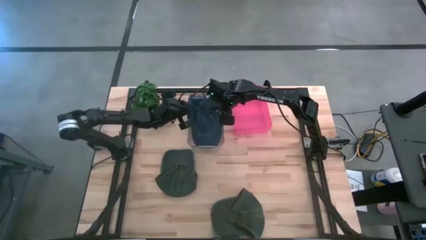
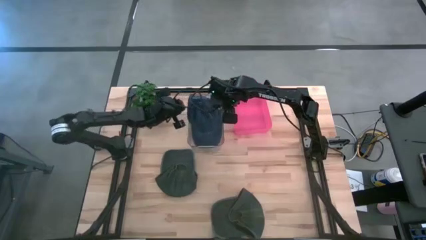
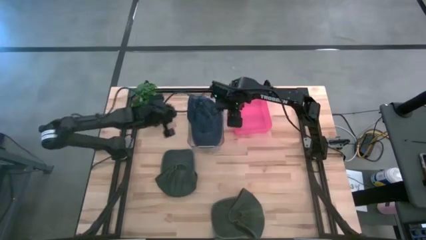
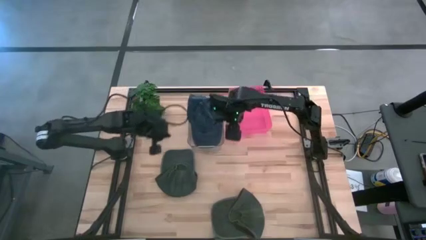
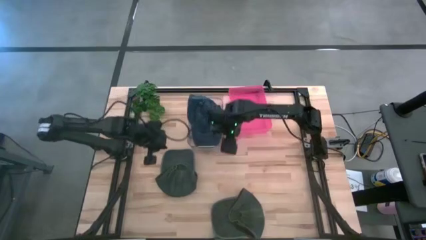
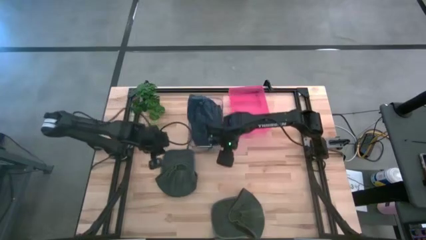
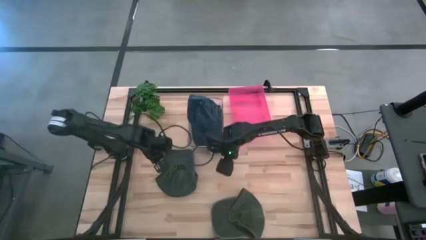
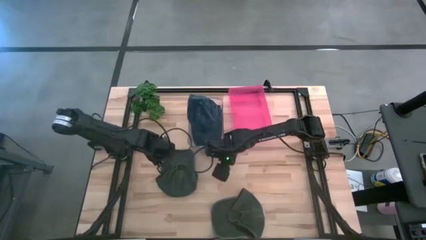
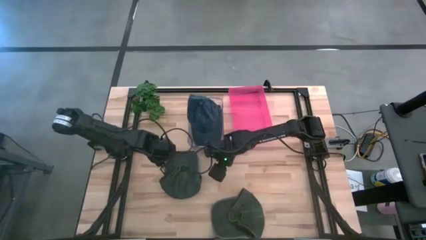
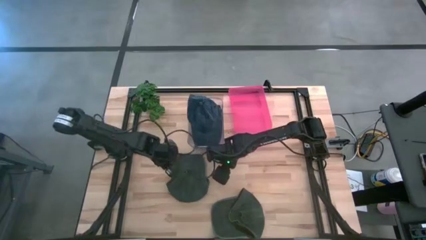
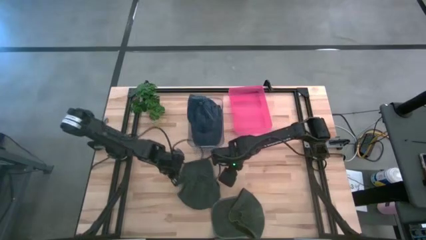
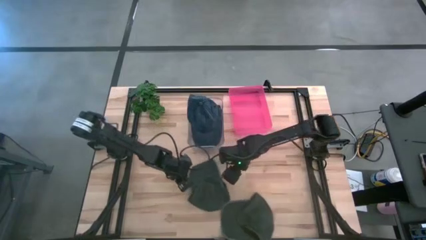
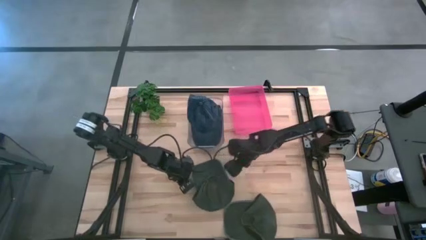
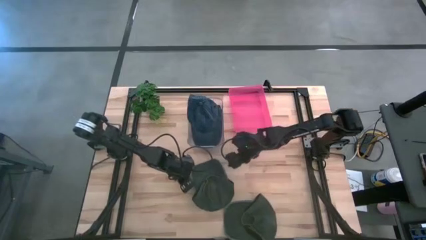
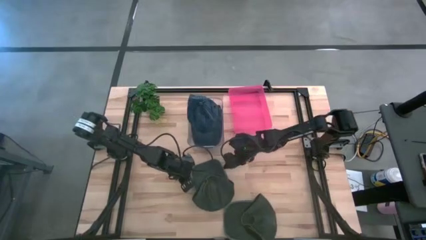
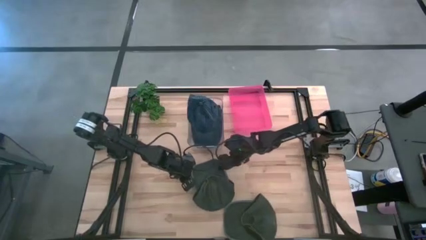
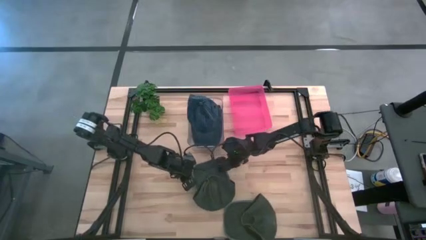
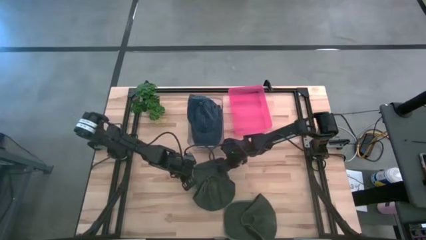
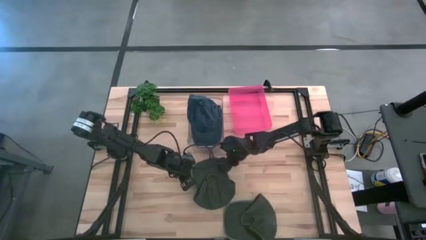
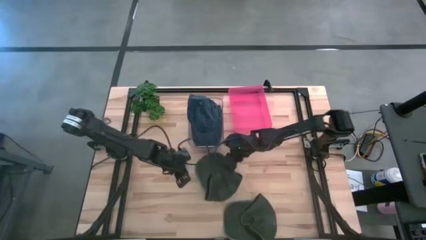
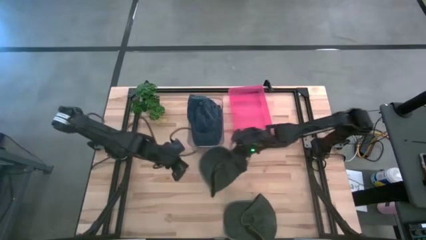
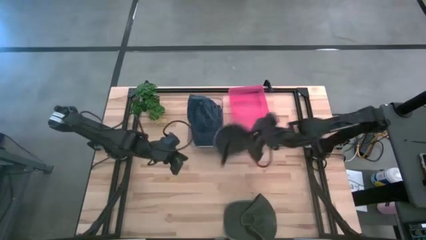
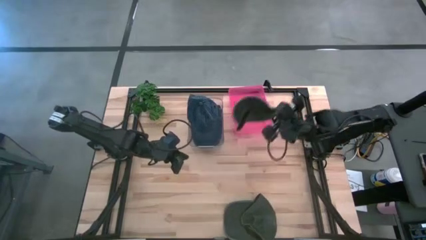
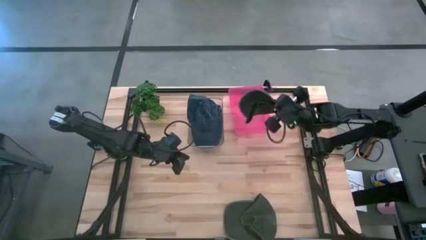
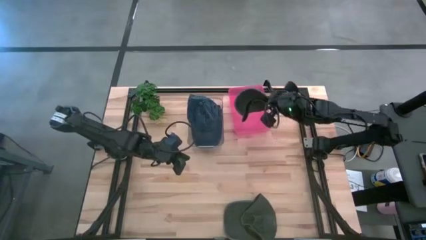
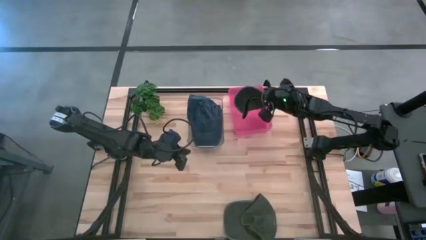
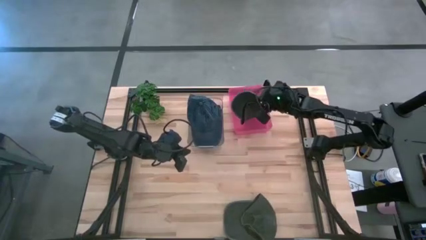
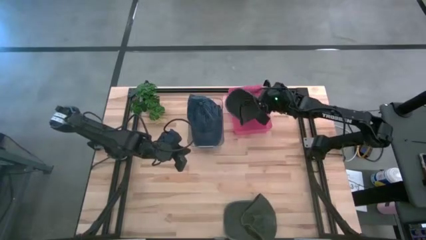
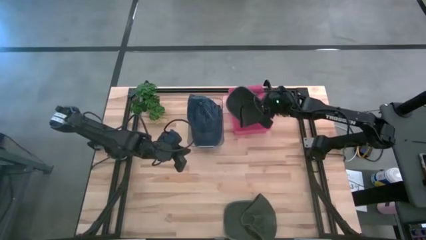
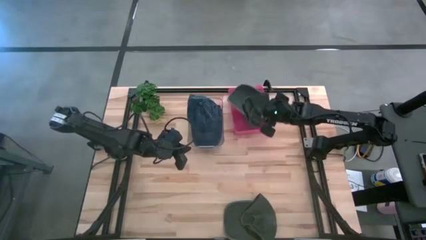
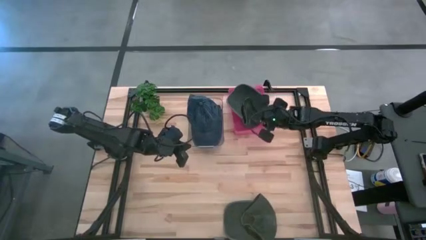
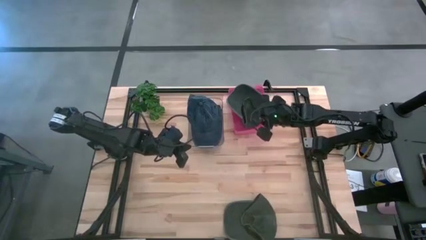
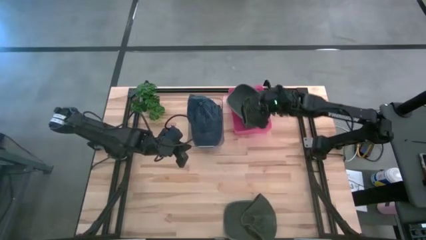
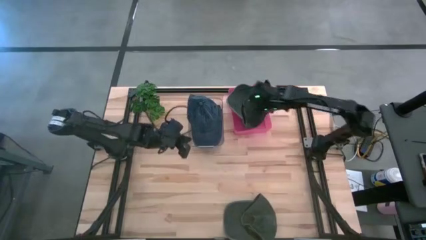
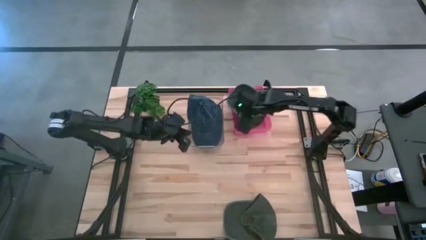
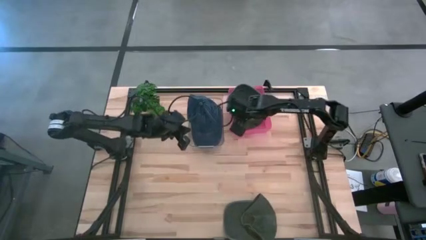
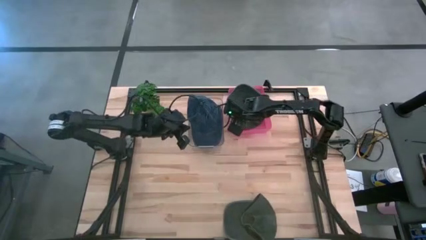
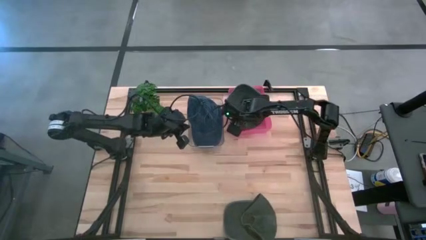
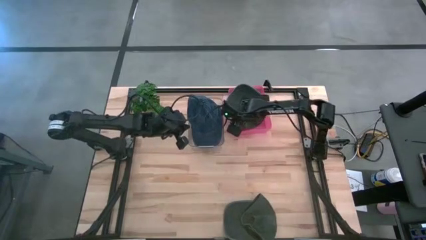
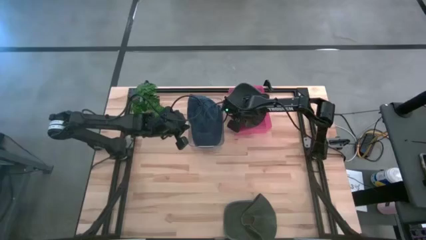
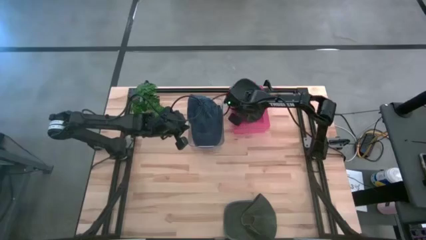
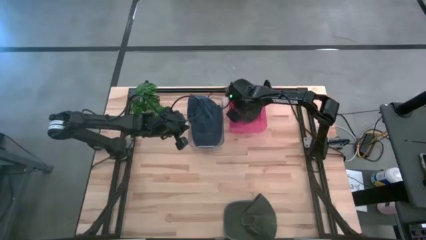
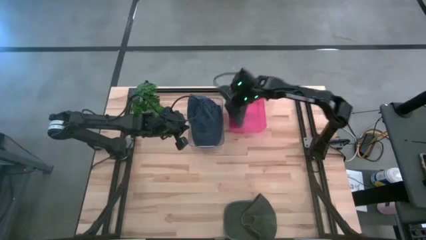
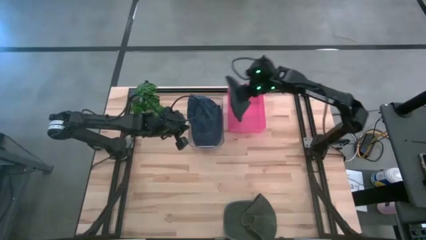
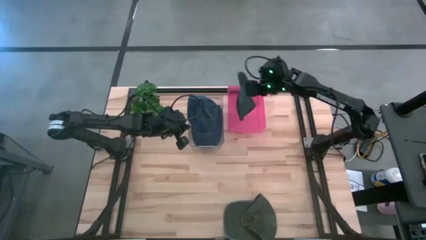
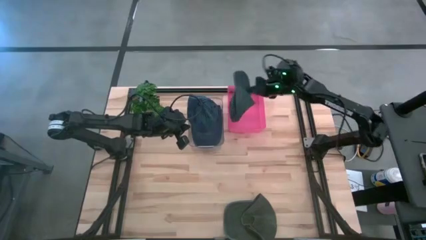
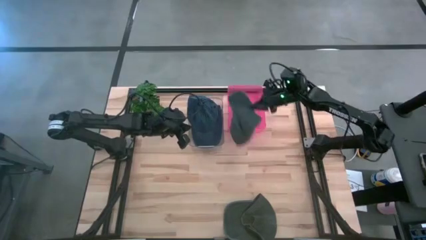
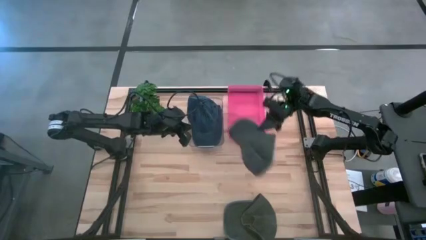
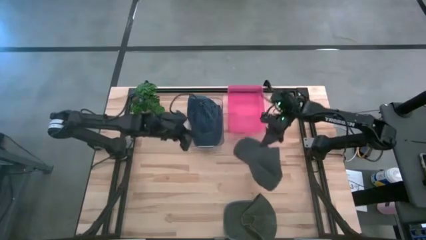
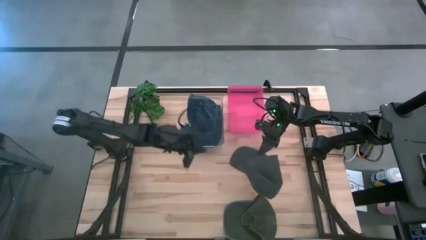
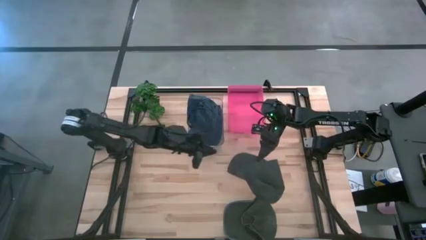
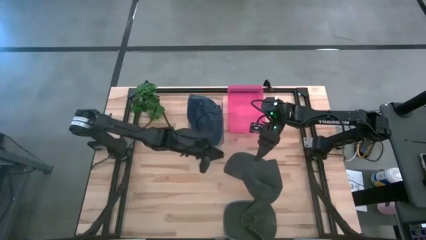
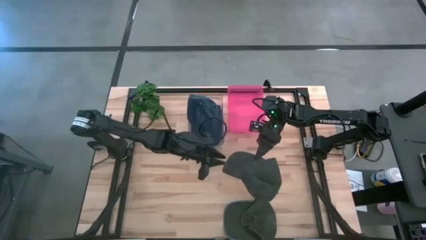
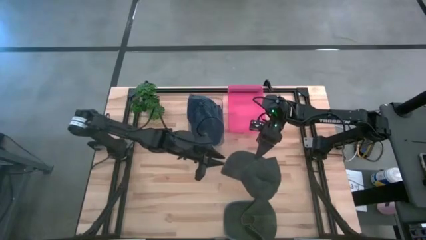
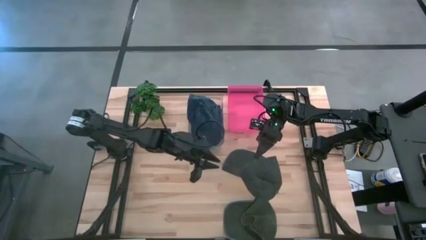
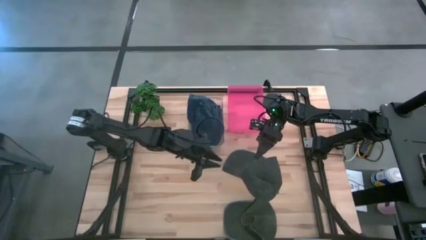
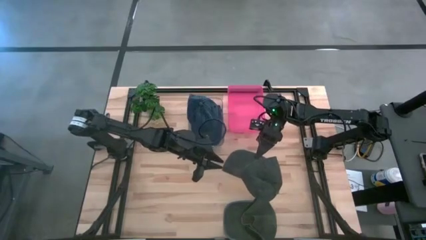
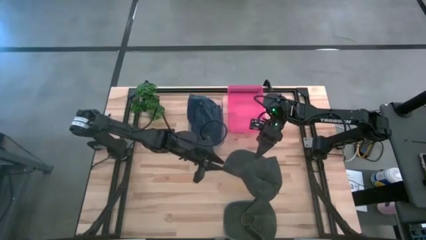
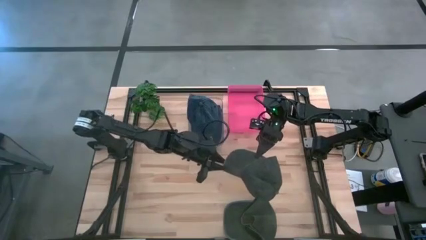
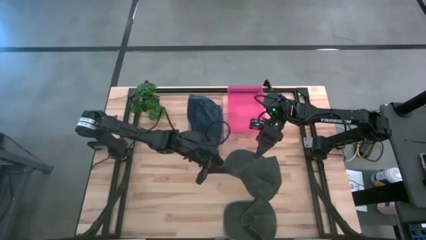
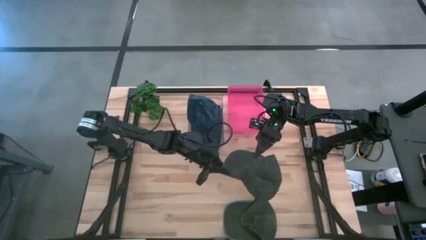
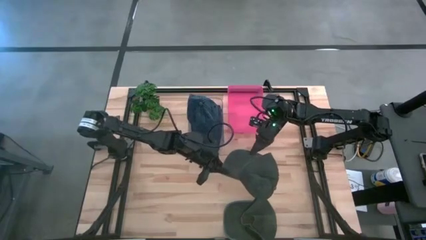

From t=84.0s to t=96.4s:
Task: Pick & Place hat
Put the left green cap into the red bin
